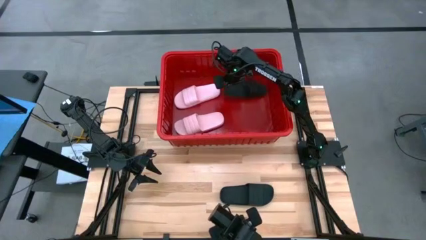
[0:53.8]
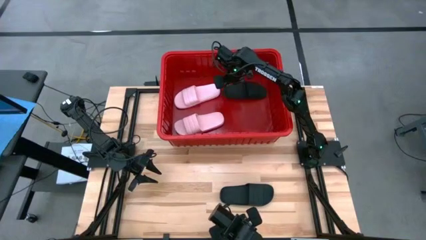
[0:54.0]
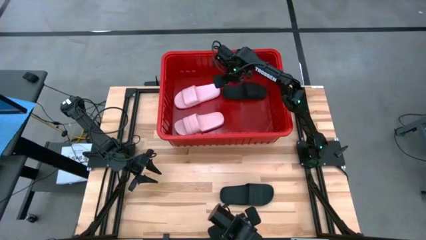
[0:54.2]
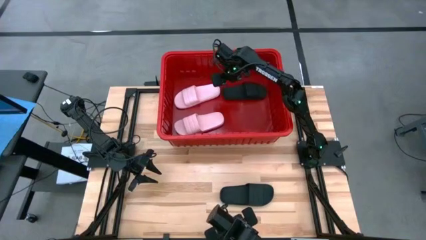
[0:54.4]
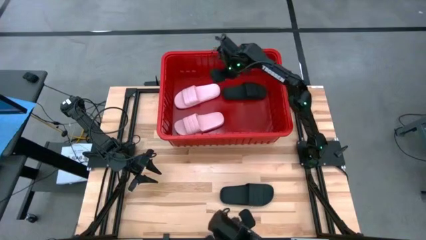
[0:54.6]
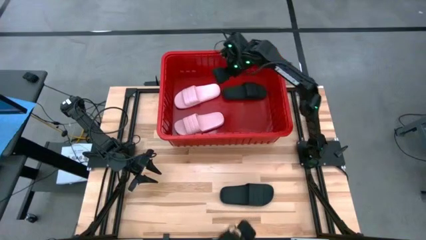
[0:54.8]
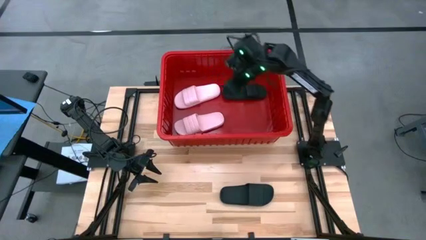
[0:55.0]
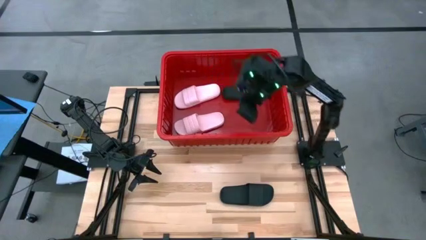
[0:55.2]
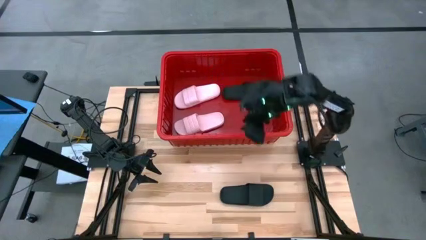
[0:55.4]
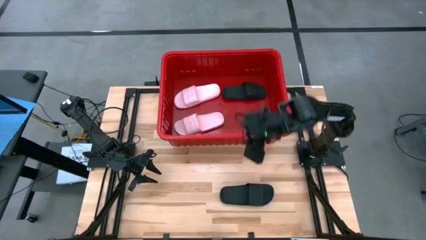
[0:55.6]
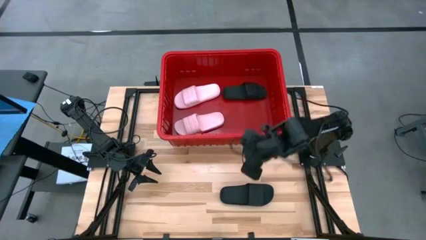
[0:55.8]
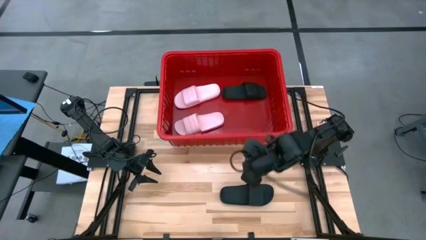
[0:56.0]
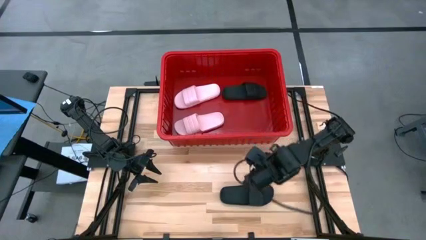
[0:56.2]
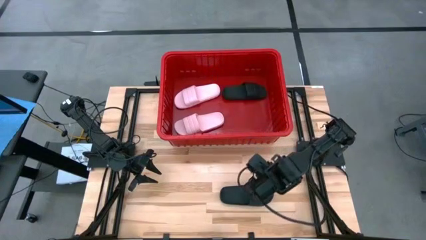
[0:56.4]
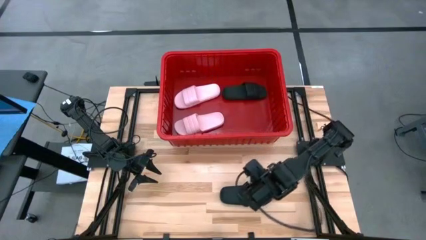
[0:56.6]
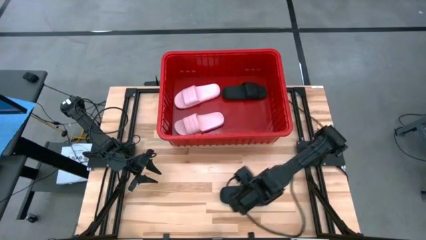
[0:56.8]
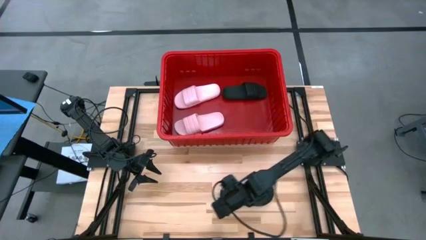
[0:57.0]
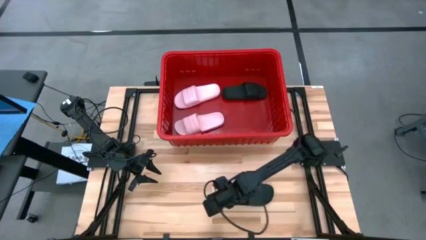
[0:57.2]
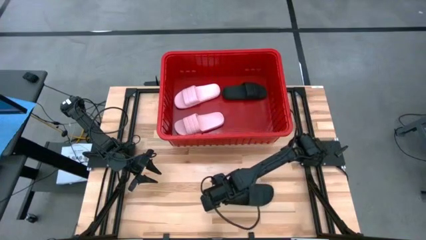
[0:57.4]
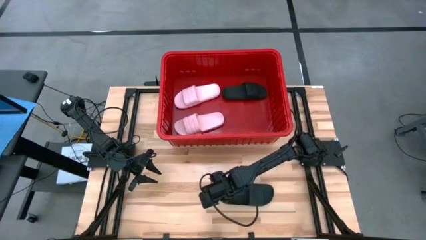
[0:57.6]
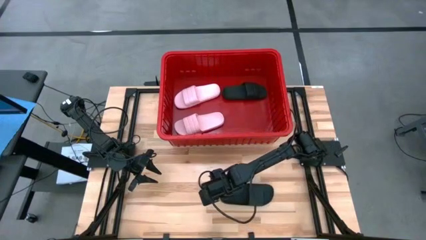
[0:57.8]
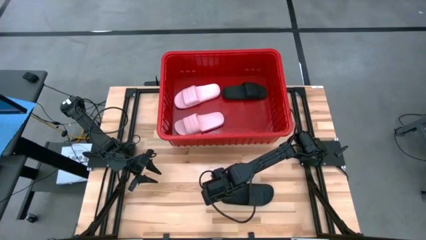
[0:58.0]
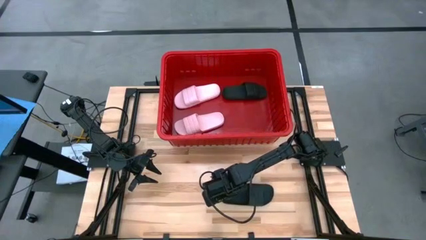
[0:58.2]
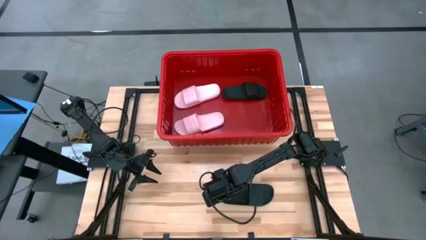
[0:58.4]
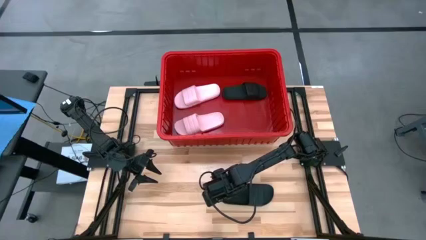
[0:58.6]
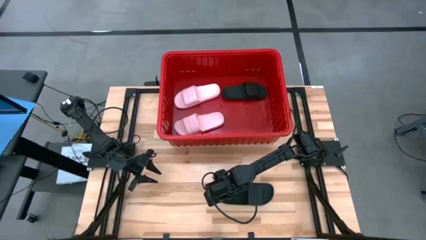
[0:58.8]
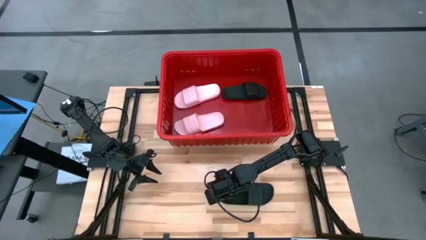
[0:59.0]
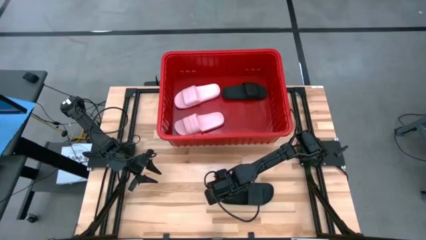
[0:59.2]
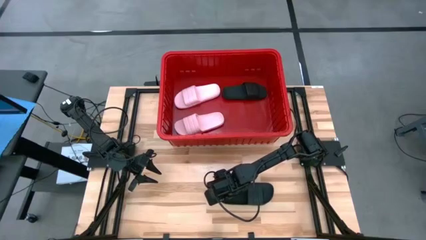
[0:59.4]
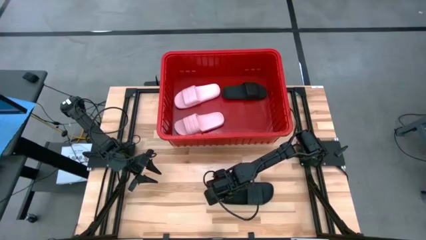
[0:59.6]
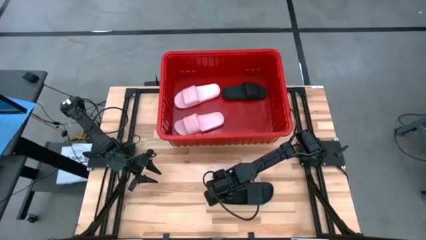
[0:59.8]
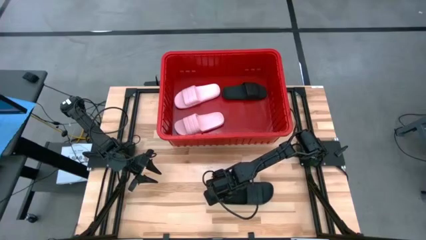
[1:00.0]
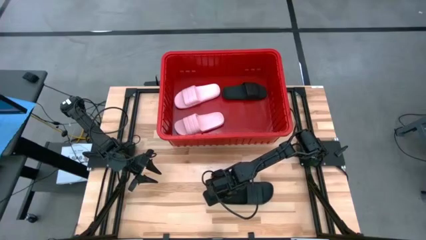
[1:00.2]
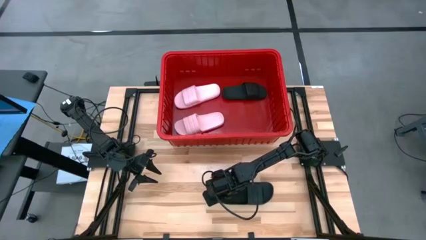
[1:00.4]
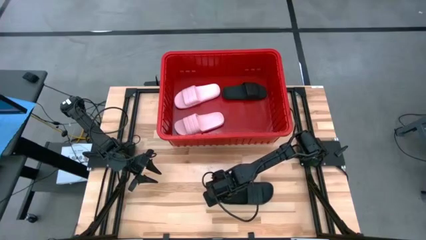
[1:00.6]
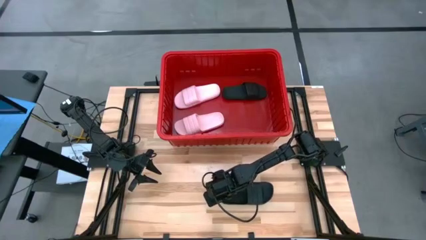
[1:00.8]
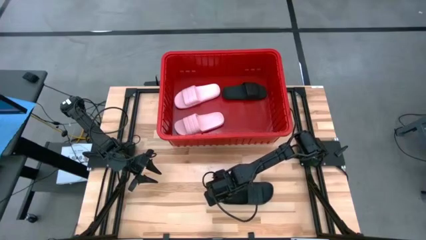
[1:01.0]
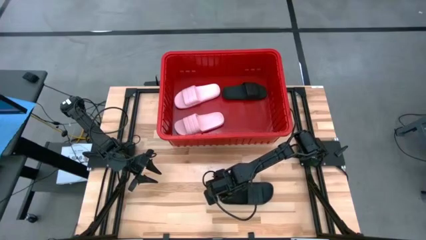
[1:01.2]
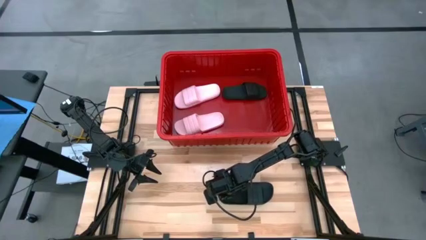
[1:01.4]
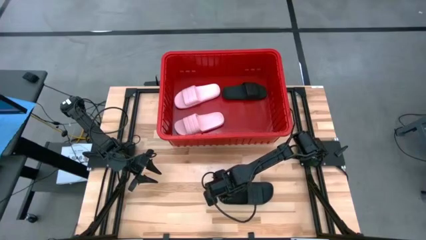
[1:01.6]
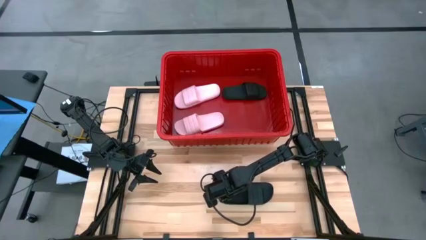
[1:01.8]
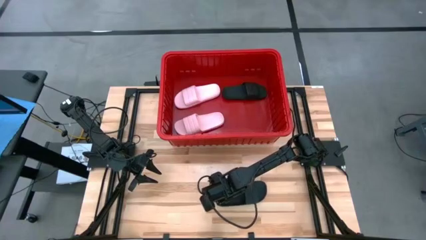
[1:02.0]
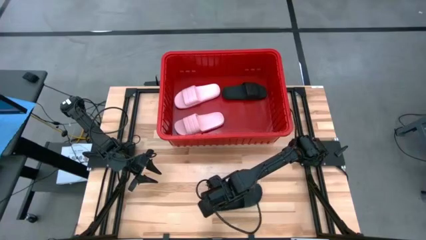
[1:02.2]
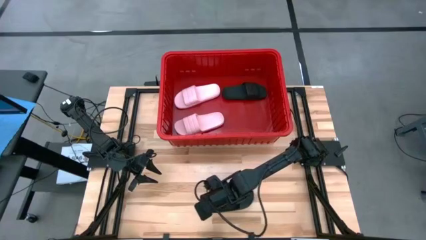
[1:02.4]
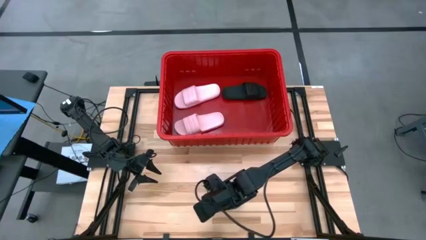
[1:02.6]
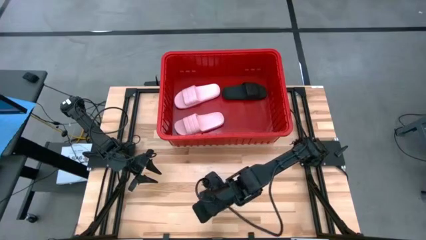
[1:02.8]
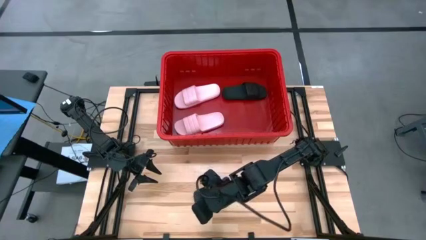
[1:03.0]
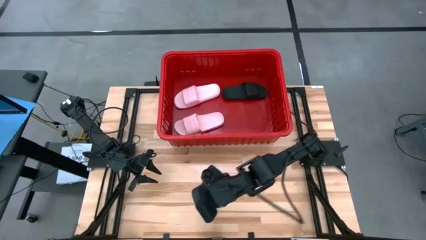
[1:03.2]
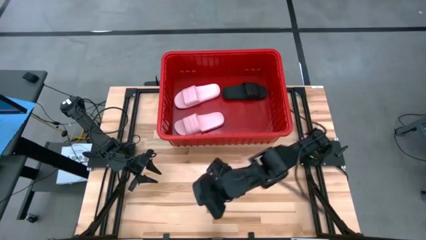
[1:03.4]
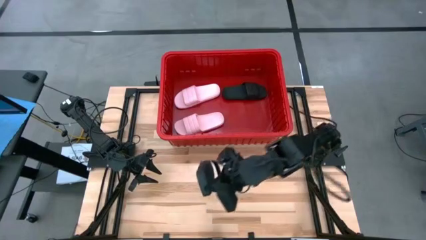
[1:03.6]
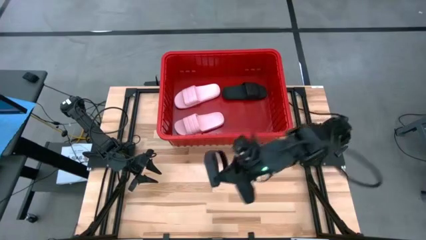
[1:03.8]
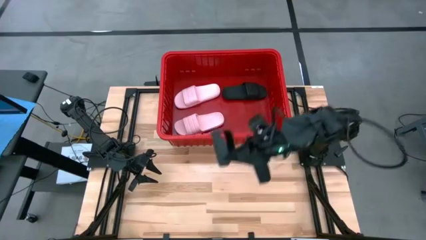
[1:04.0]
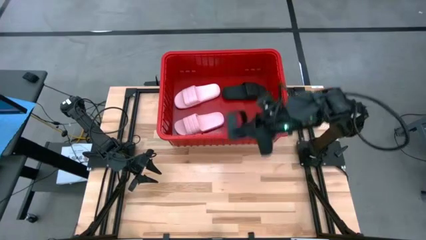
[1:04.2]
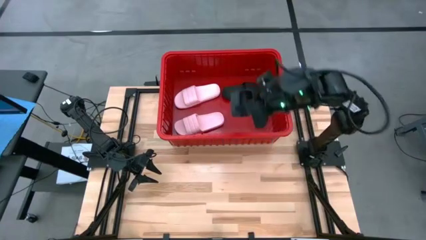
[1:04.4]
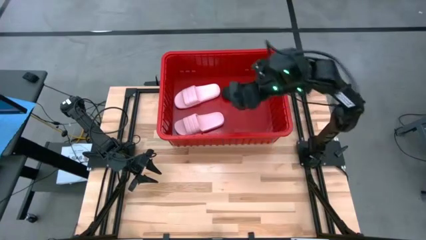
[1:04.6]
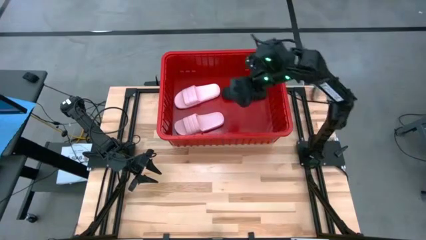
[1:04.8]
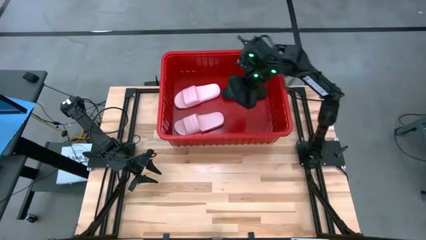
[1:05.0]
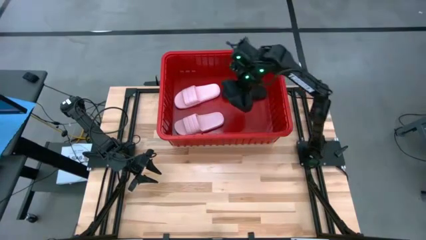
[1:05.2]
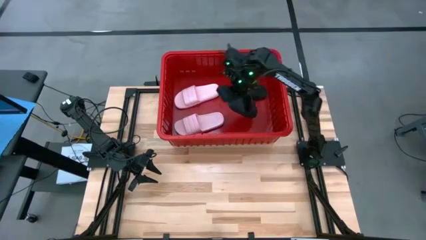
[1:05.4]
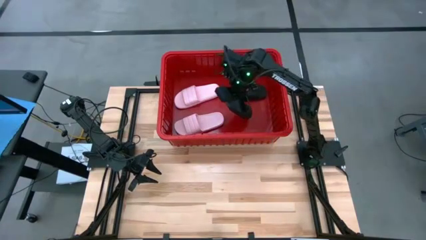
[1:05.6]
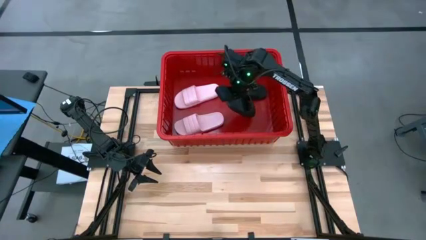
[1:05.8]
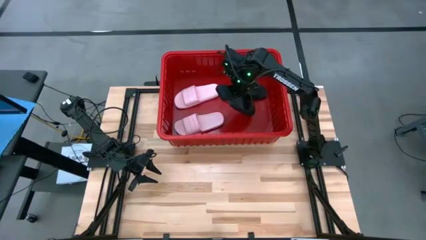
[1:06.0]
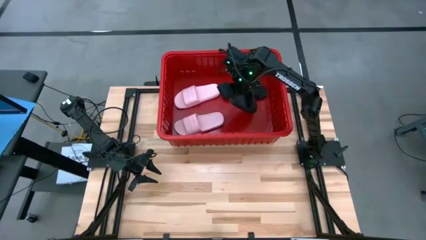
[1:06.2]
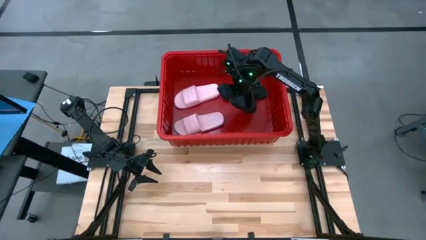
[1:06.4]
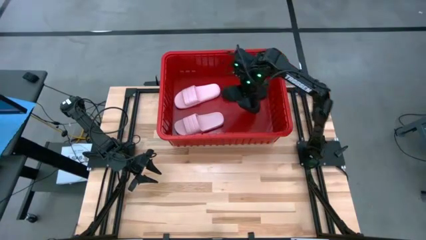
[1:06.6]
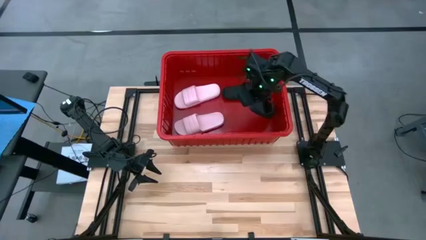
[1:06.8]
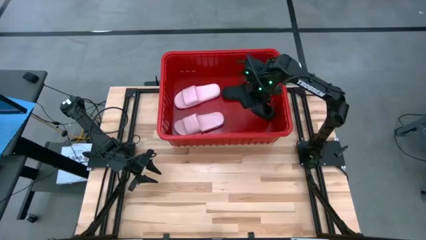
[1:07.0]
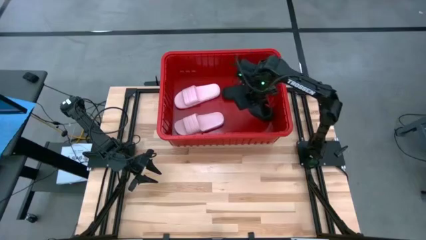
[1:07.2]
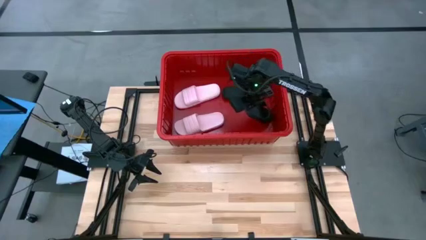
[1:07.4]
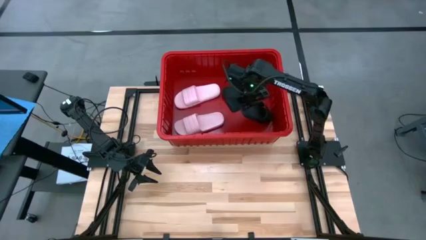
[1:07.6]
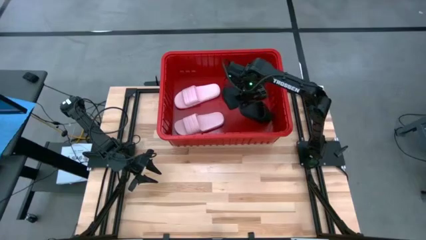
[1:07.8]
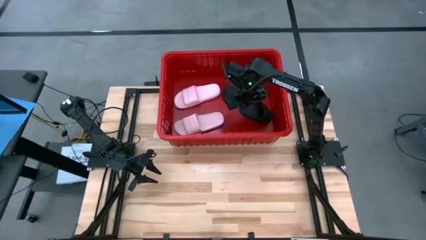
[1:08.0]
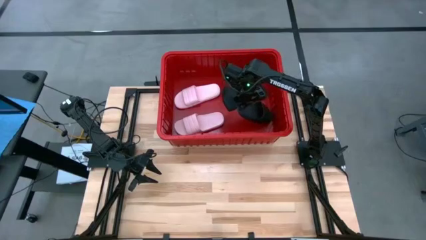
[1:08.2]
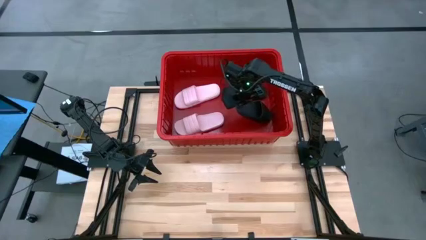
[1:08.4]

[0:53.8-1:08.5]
Task: Pick and place slides into bin
Put the black slide into the red bin
